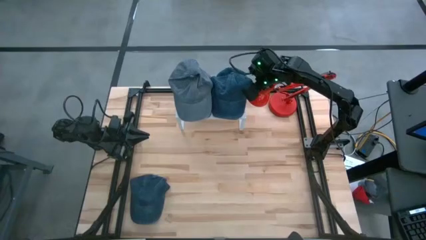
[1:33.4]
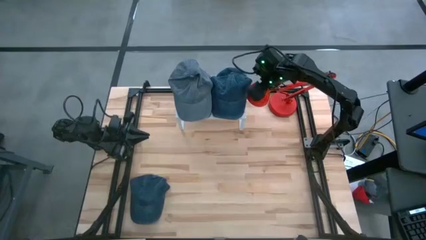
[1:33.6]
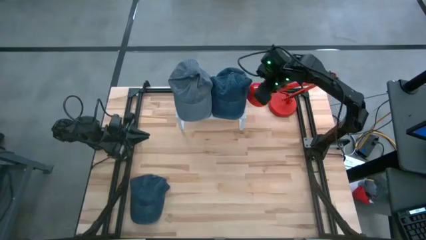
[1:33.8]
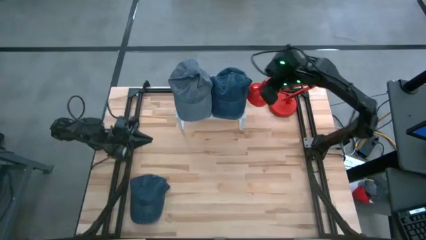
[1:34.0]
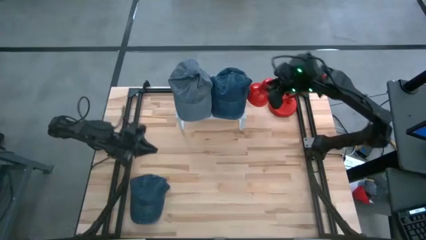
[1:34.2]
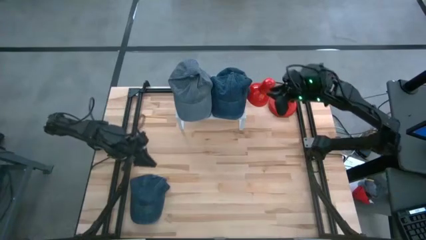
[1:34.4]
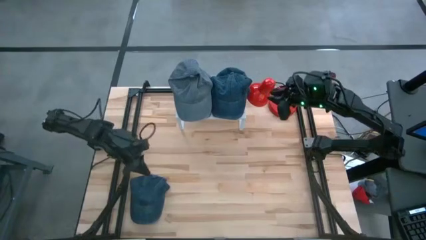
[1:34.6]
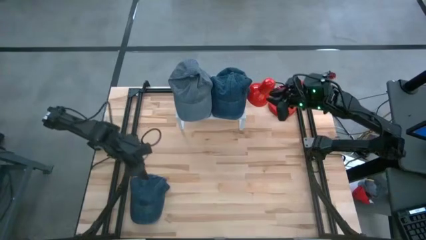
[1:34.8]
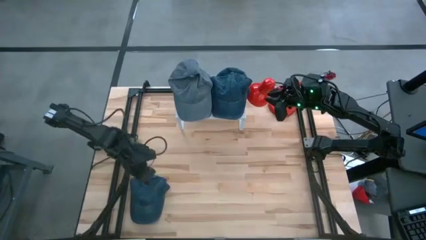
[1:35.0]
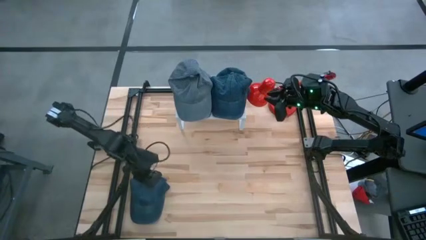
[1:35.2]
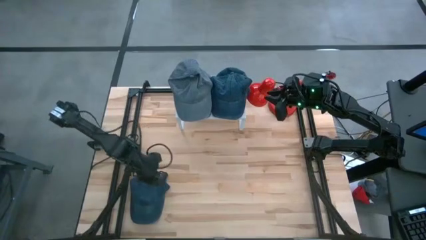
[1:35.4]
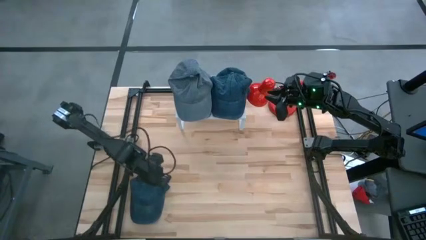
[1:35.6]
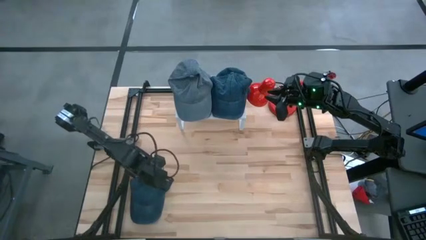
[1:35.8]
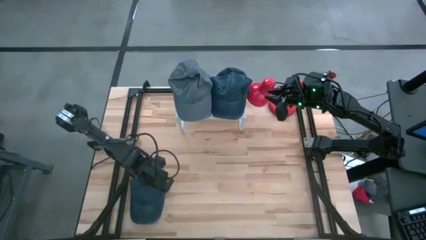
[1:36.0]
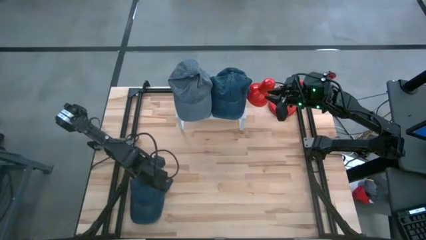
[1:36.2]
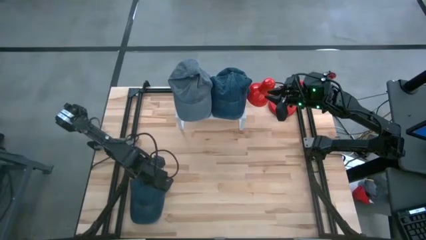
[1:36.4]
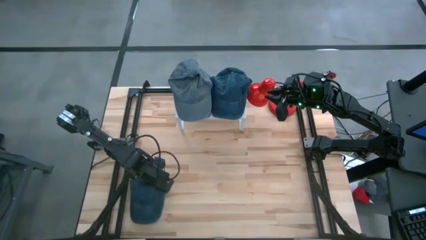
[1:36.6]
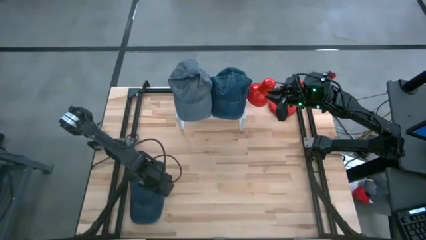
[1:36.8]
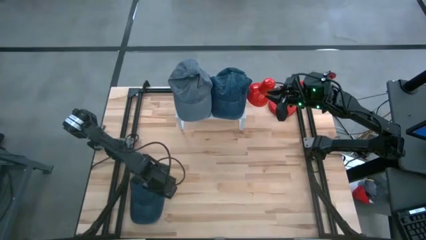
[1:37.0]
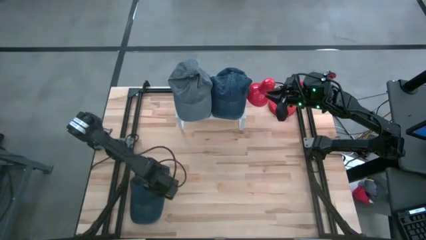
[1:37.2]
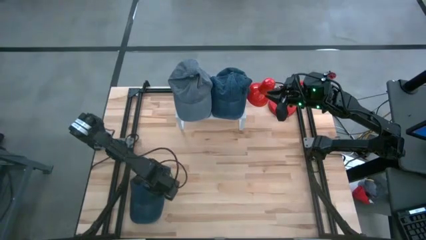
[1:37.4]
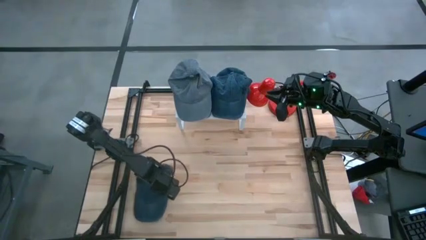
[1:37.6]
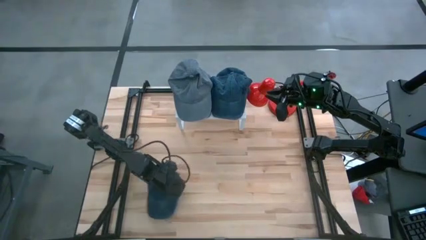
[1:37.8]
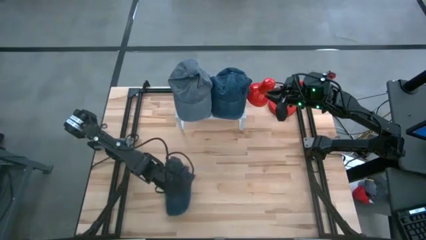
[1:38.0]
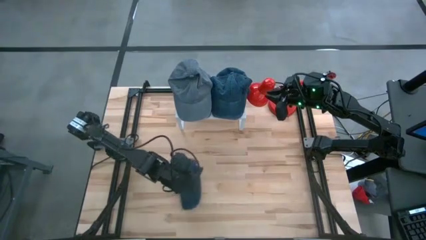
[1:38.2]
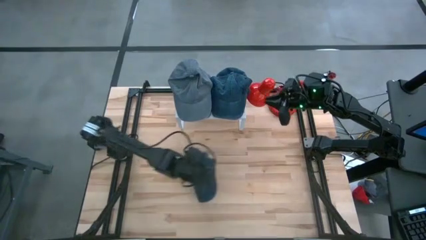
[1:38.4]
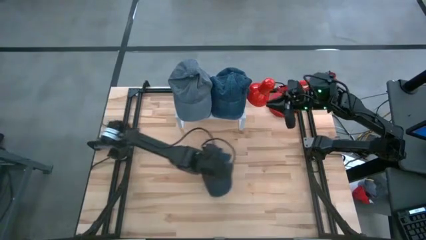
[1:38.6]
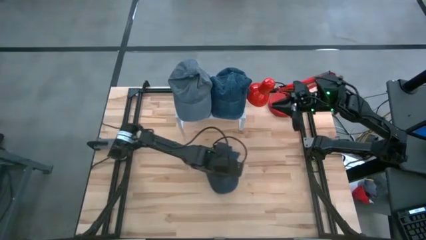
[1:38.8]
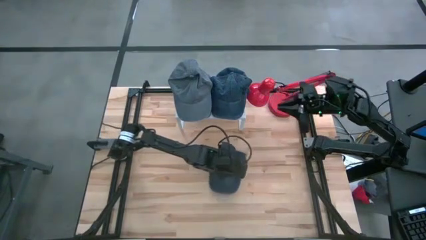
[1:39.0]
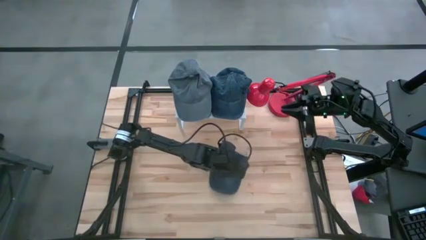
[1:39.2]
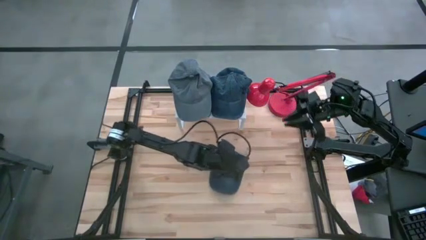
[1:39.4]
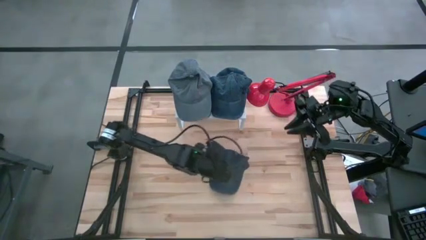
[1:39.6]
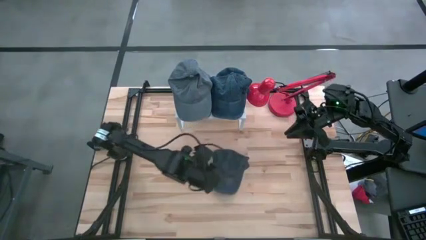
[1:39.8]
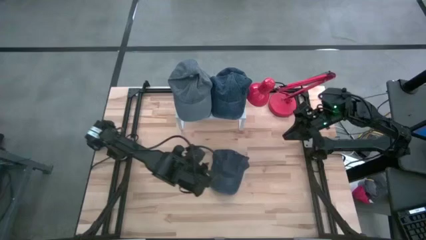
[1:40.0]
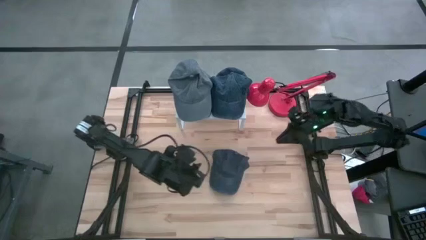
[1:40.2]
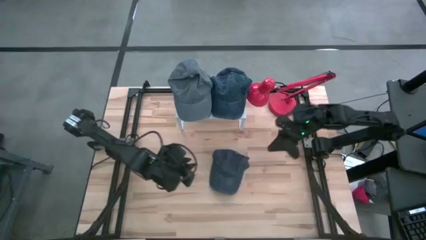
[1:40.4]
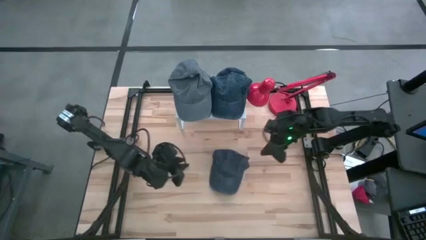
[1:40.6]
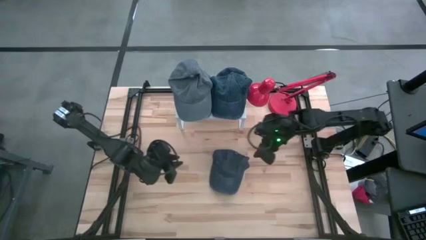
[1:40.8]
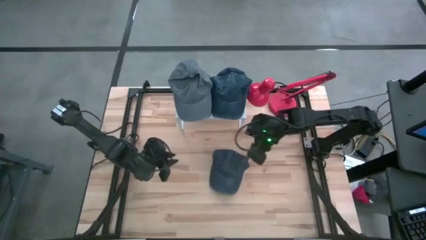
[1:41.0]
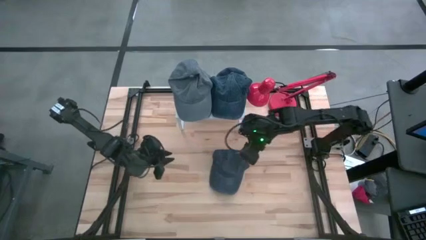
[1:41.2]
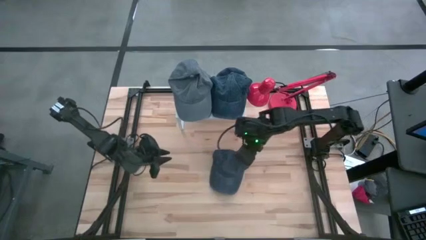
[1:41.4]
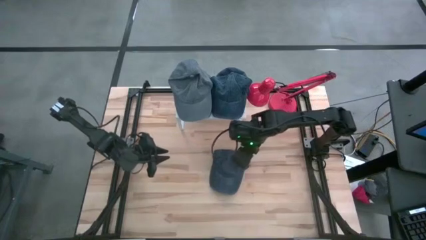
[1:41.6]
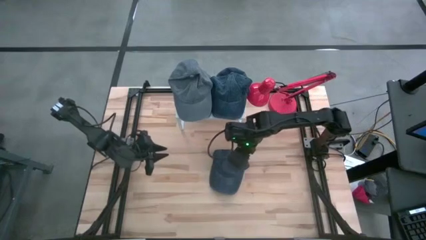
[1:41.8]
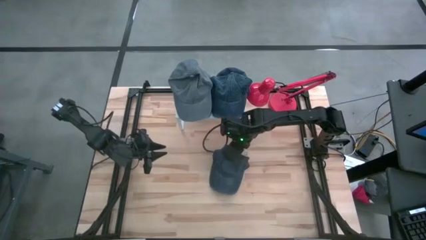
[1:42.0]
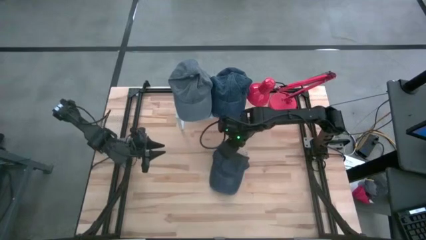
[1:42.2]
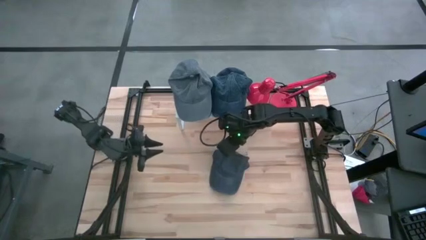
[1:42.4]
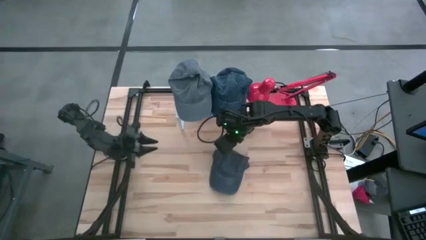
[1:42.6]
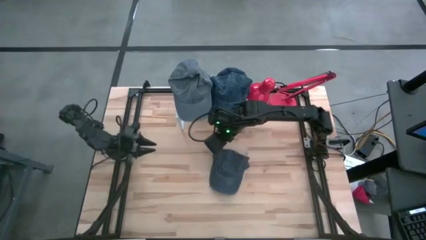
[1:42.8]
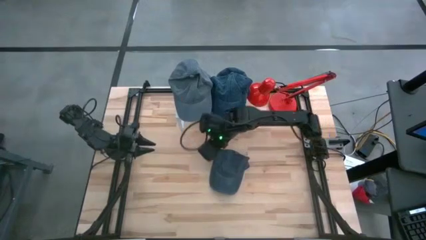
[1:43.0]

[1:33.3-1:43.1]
Task: Pick & Place hat
Stack the blue cap on the blue cap on the shelf

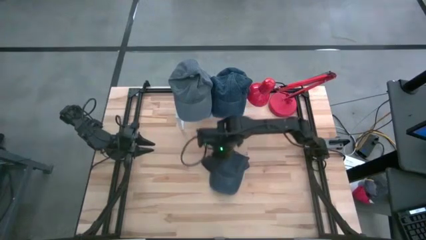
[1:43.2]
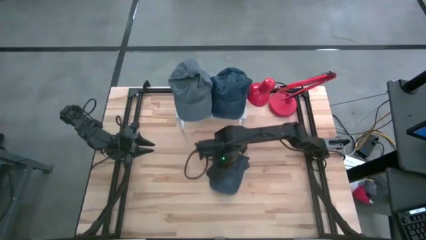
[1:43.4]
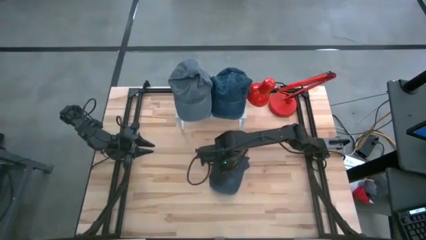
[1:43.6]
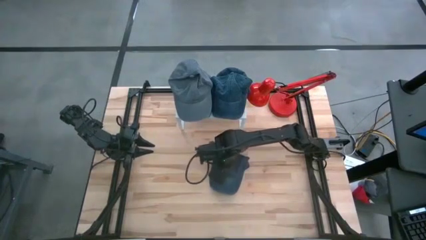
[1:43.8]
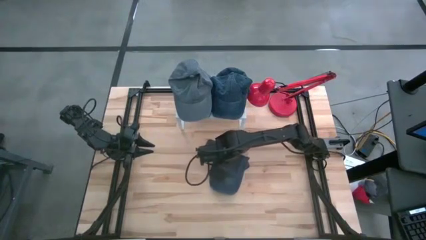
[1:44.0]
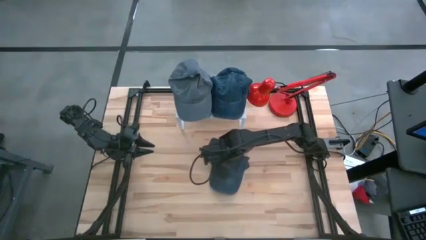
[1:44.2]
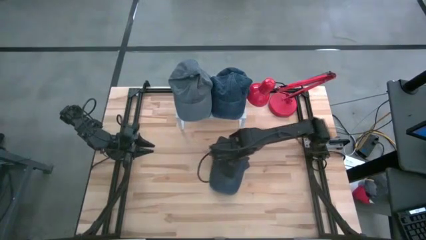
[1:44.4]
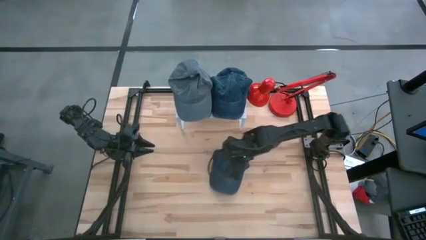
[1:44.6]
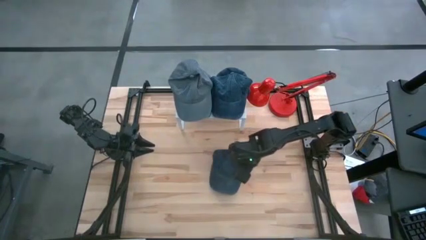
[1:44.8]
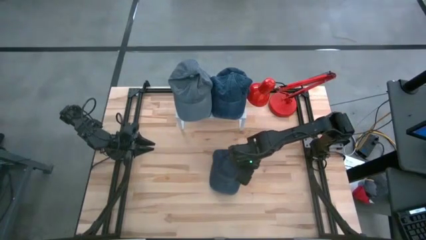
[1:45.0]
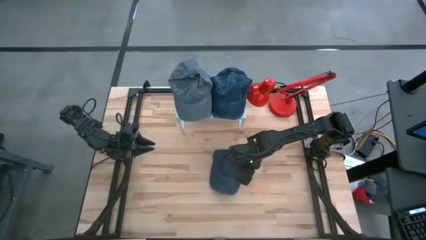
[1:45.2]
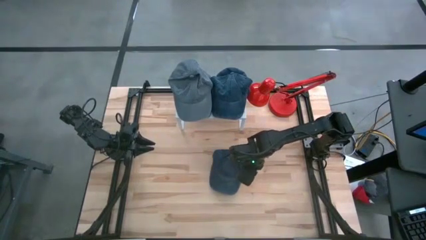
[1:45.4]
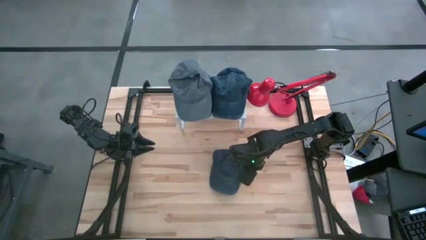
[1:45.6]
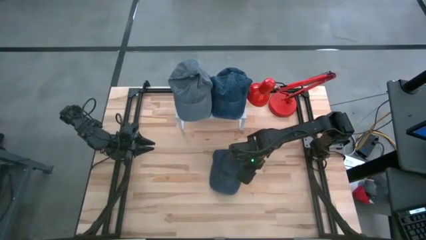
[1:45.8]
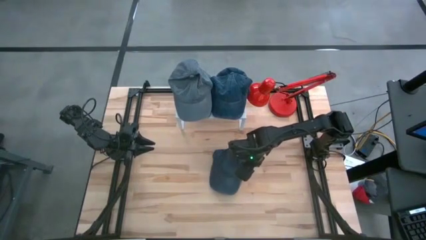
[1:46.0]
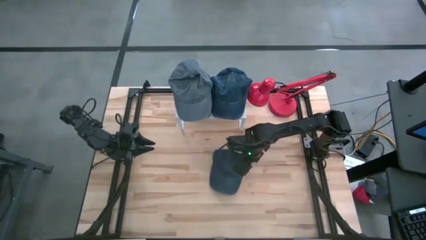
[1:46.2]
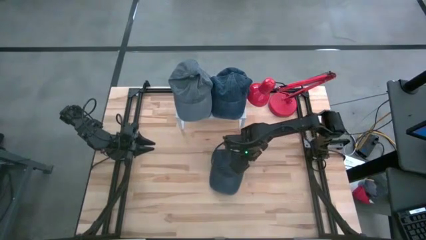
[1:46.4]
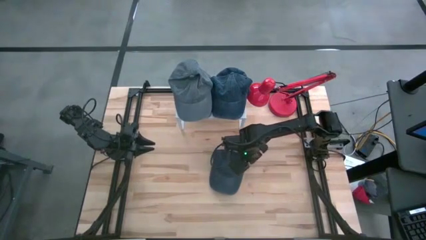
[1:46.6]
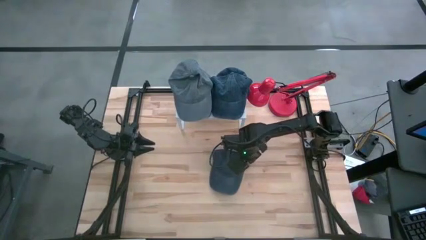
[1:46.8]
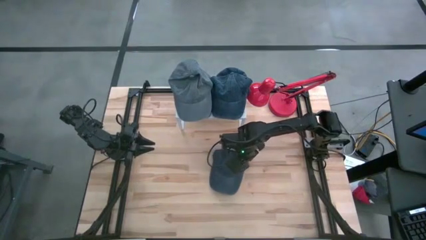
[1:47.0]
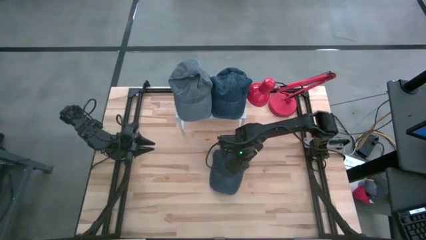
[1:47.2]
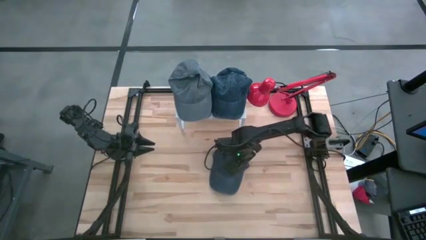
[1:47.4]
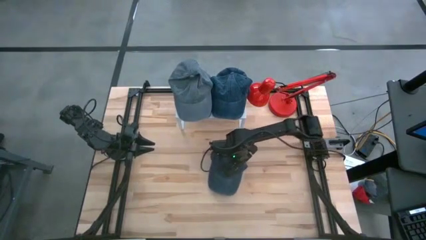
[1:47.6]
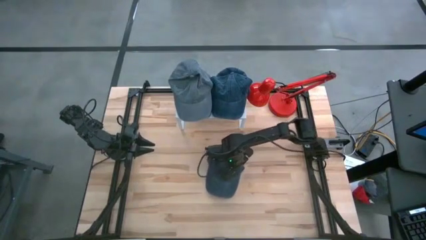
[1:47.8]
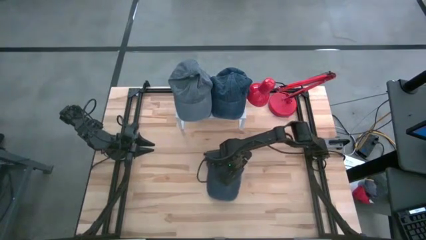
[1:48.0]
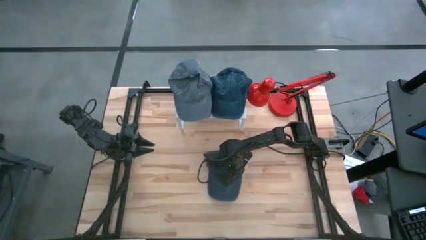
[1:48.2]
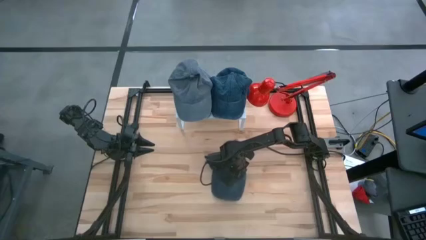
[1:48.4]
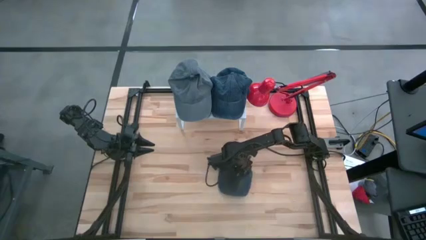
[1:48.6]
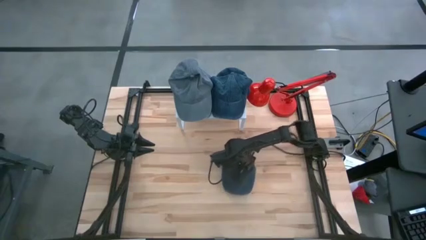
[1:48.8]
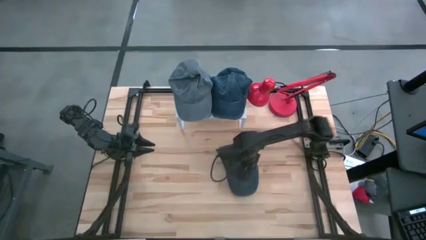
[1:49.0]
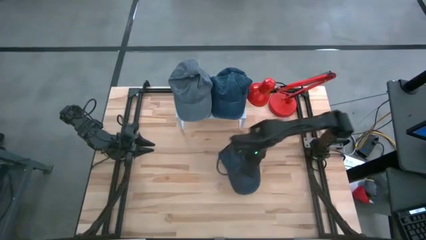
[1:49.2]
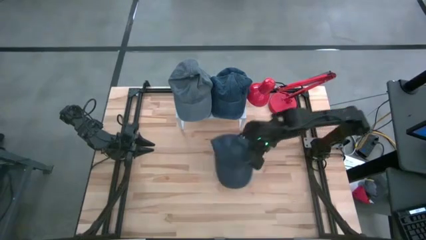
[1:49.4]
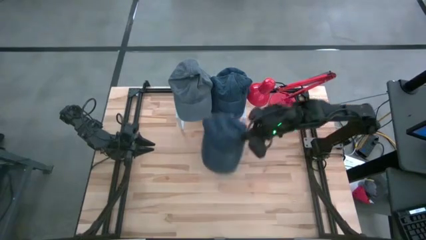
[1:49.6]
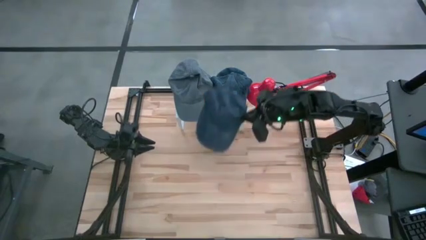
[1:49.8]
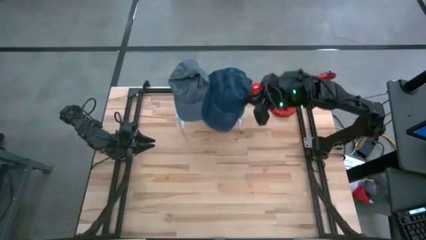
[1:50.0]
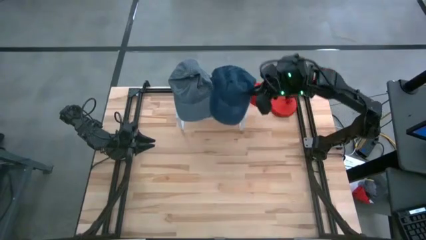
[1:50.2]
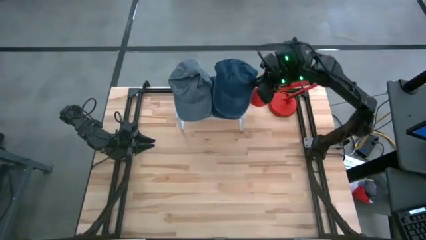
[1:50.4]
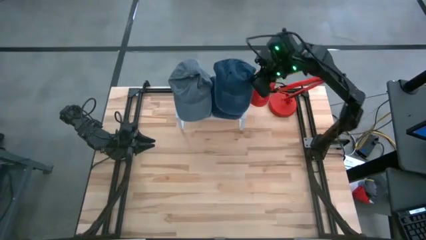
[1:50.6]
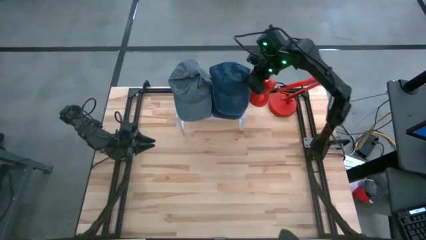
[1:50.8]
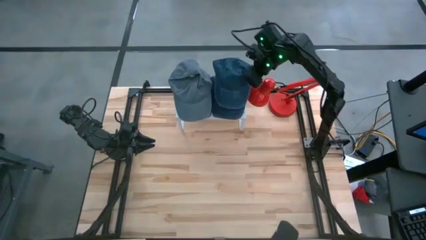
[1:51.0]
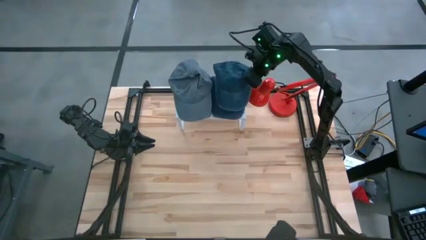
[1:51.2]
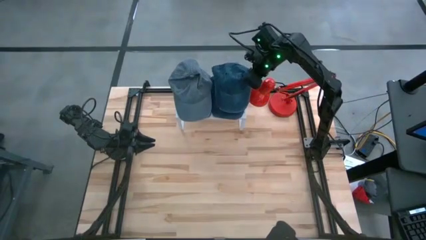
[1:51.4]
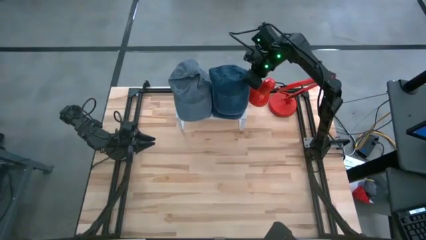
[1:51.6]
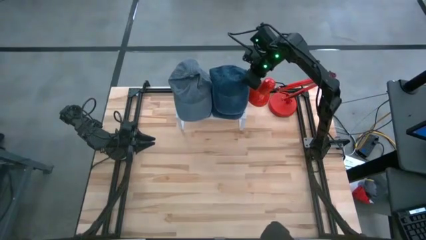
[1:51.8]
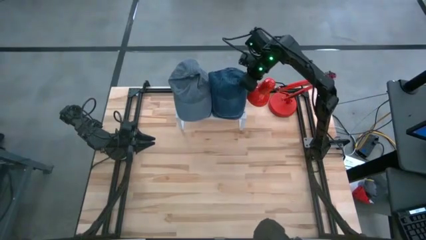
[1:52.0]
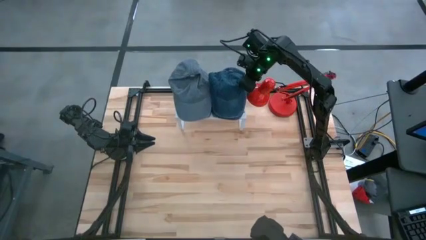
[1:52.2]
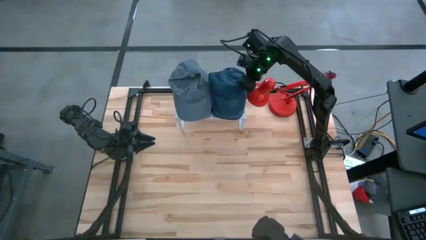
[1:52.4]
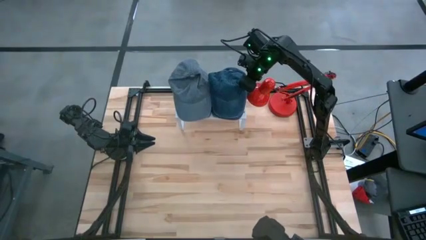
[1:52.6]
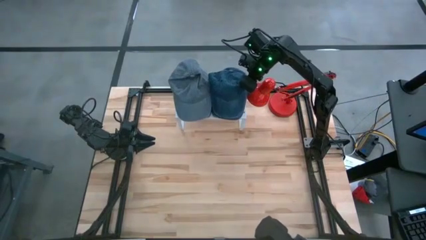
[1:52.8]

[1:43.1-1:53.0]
Stack the blue cap on the blue cap on the shelf
